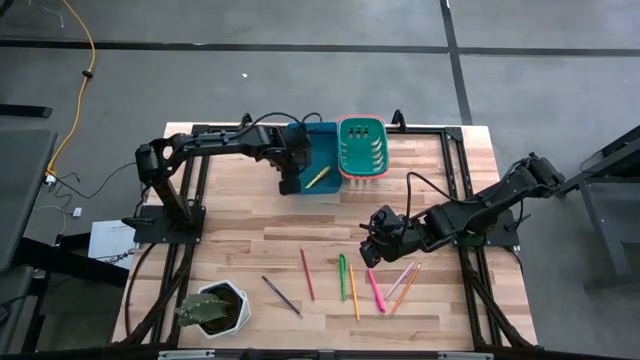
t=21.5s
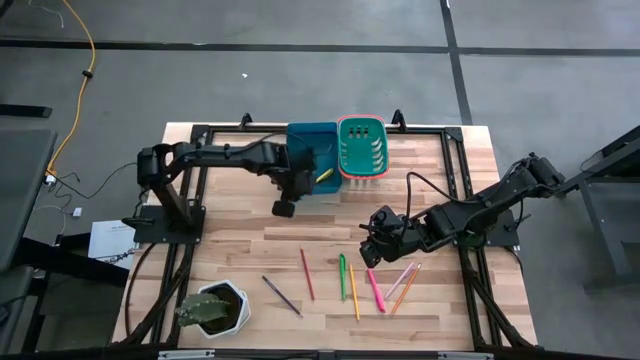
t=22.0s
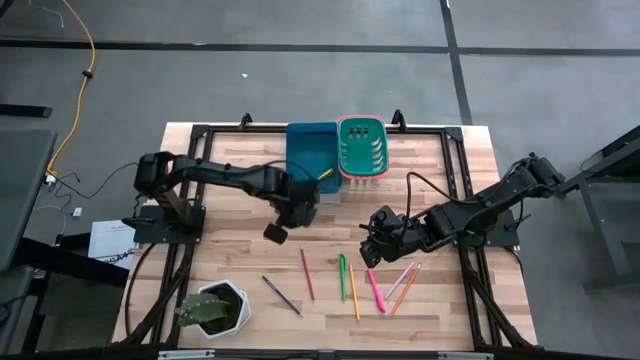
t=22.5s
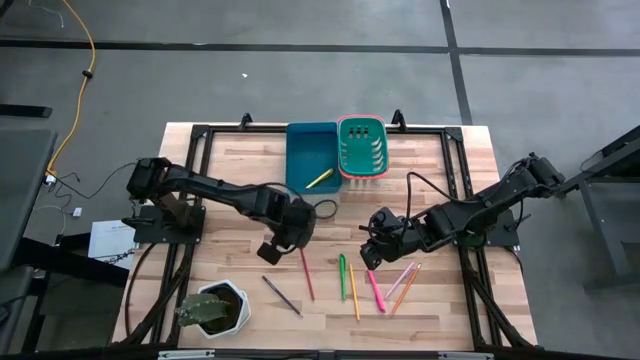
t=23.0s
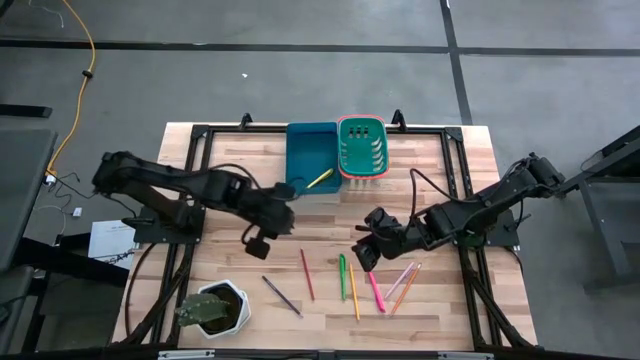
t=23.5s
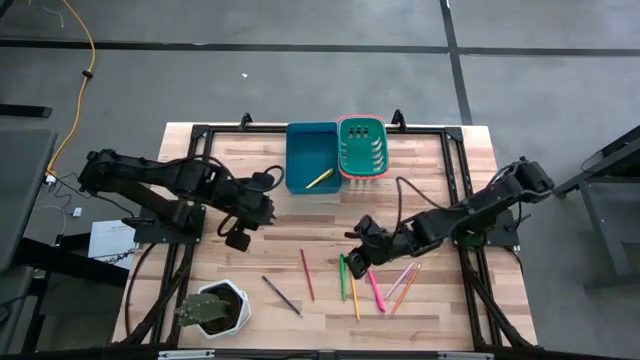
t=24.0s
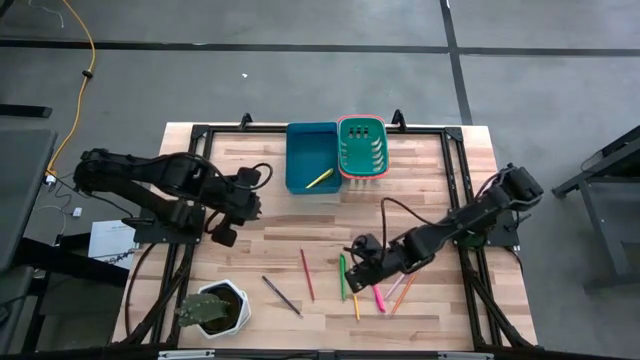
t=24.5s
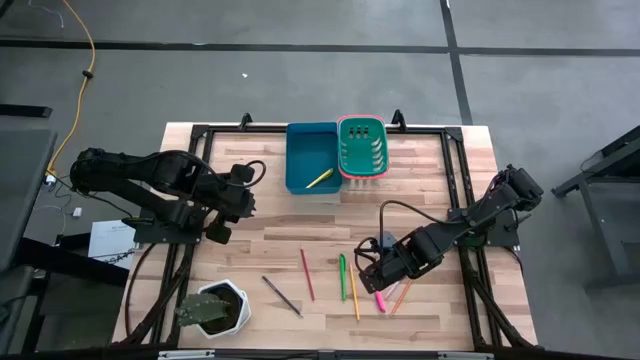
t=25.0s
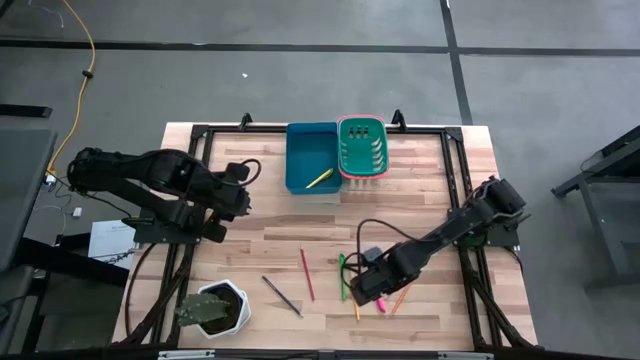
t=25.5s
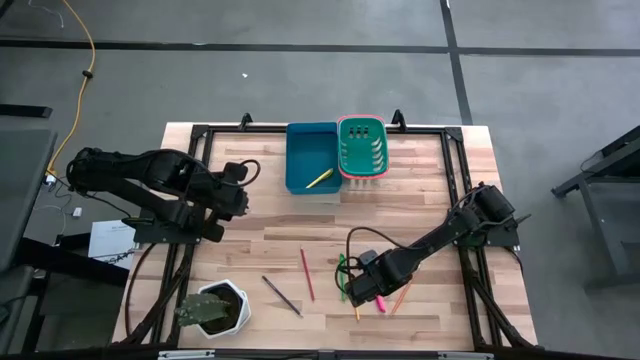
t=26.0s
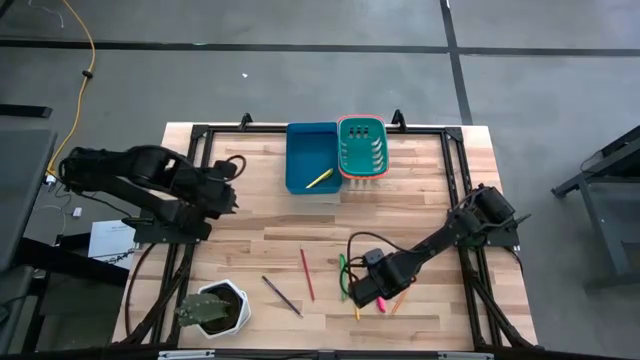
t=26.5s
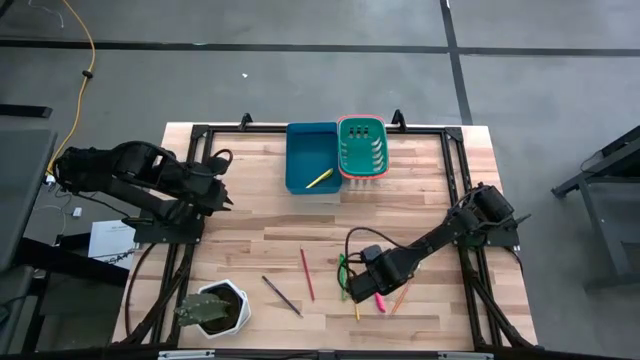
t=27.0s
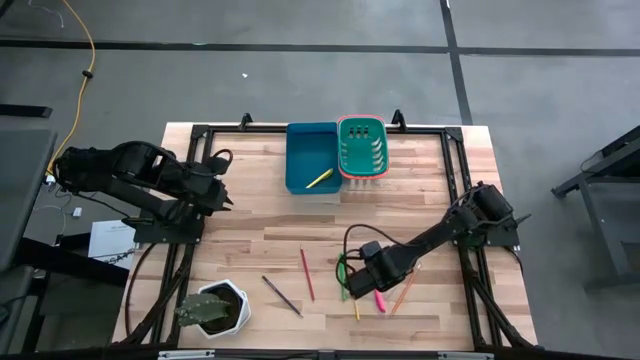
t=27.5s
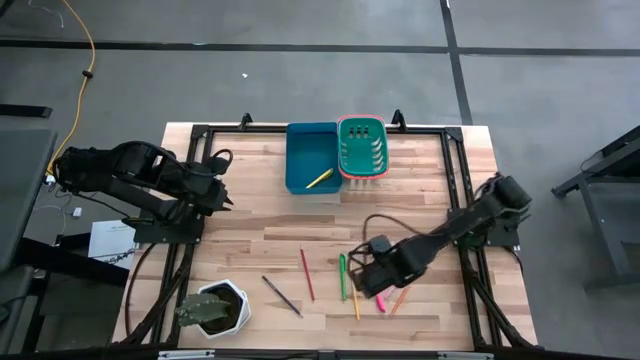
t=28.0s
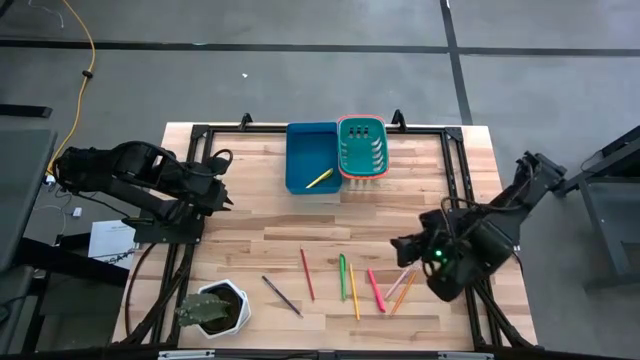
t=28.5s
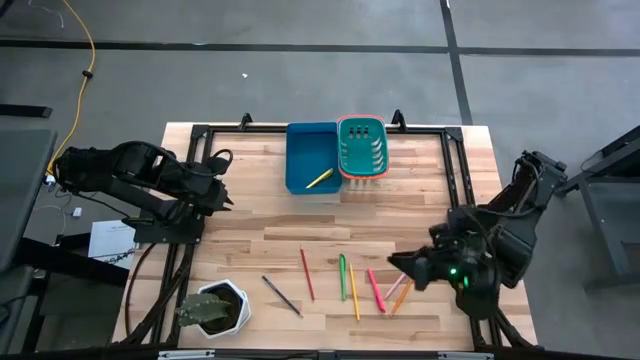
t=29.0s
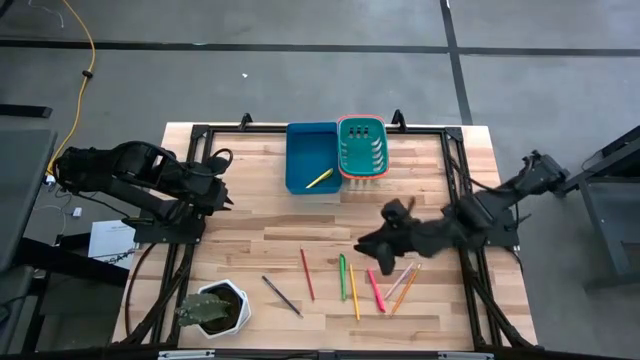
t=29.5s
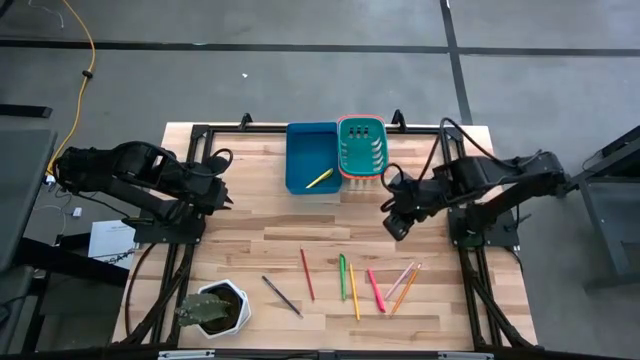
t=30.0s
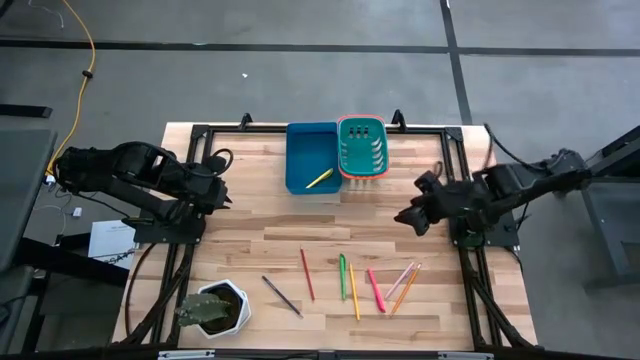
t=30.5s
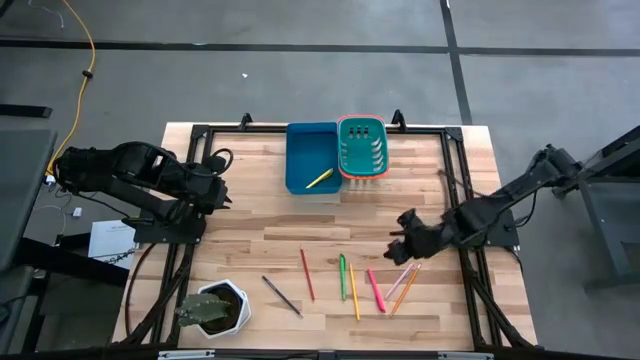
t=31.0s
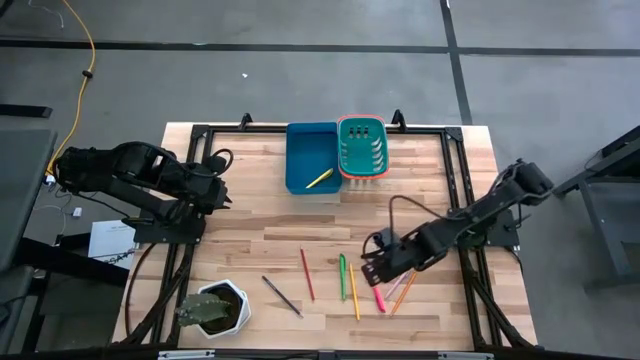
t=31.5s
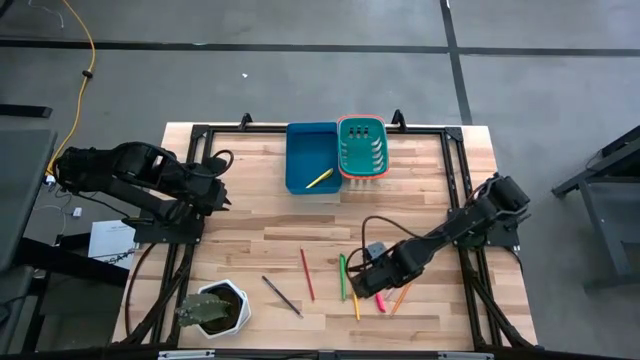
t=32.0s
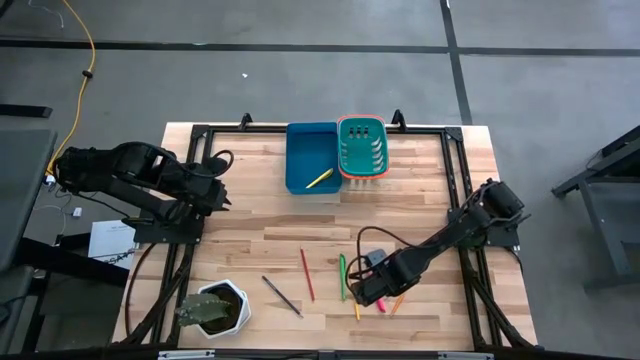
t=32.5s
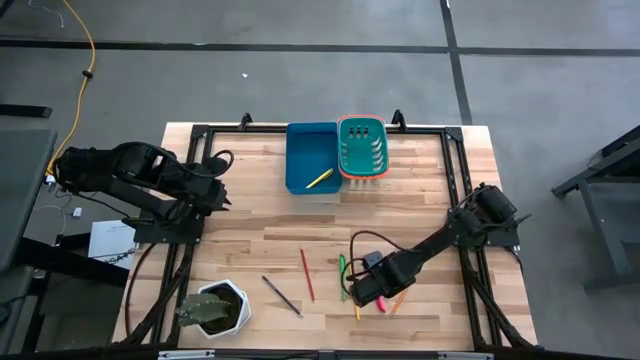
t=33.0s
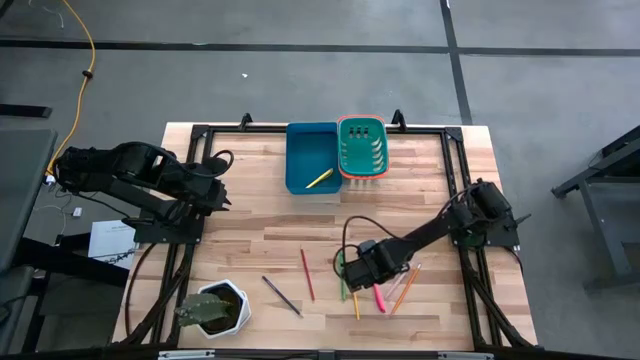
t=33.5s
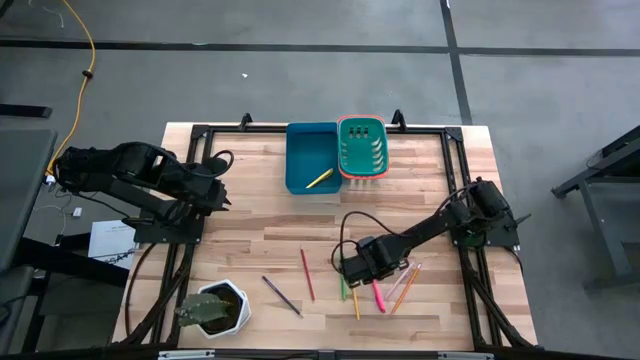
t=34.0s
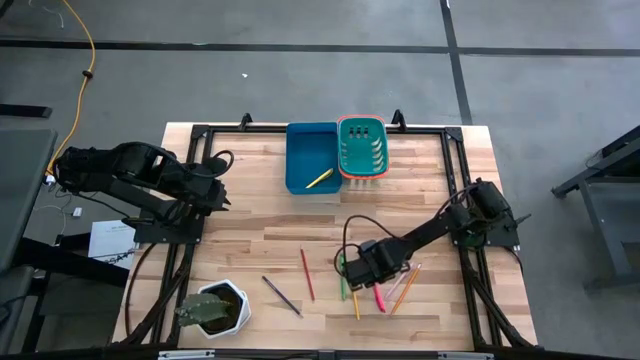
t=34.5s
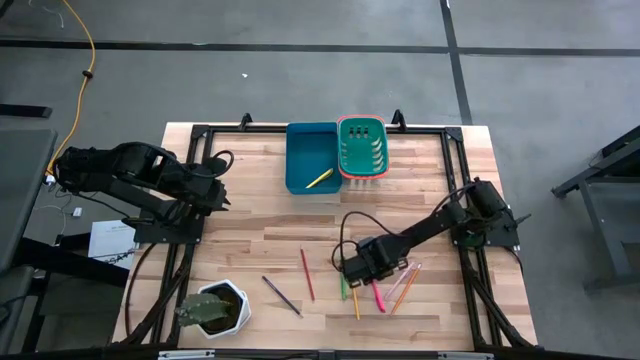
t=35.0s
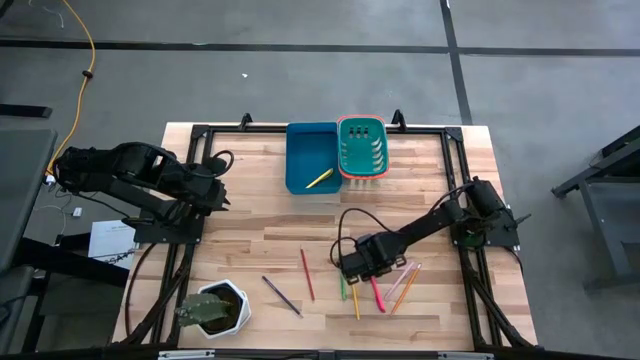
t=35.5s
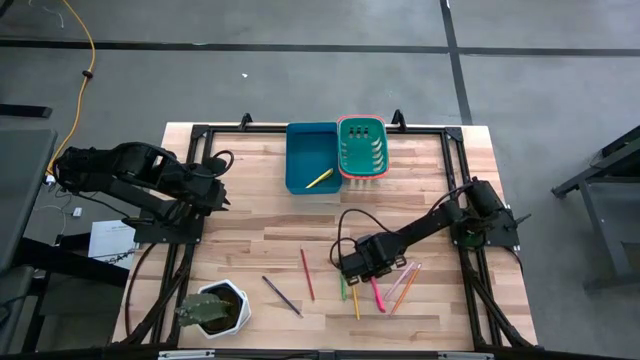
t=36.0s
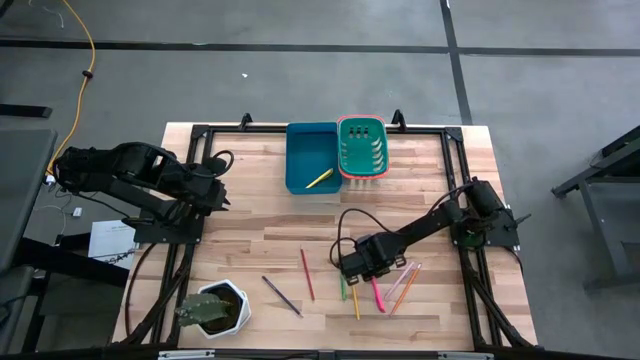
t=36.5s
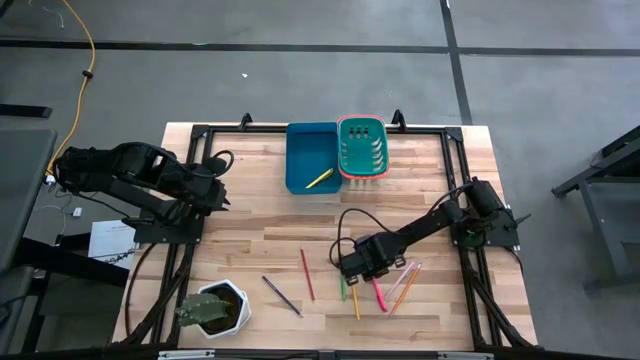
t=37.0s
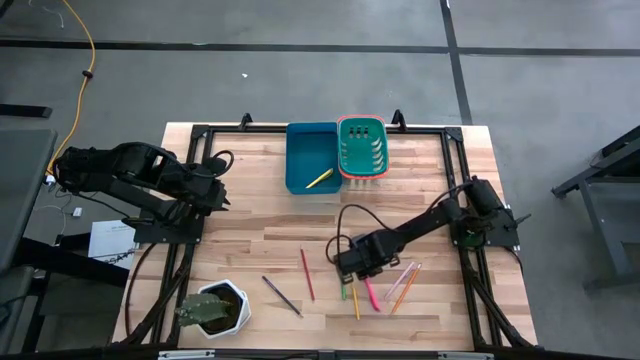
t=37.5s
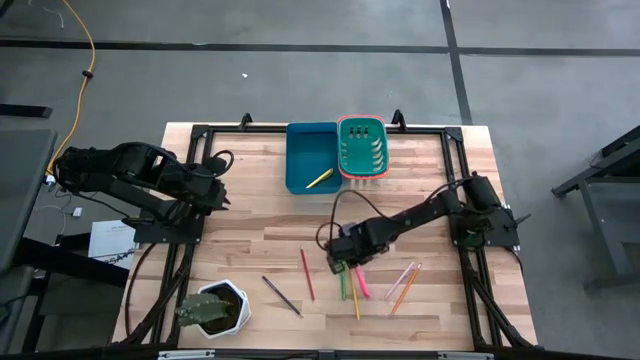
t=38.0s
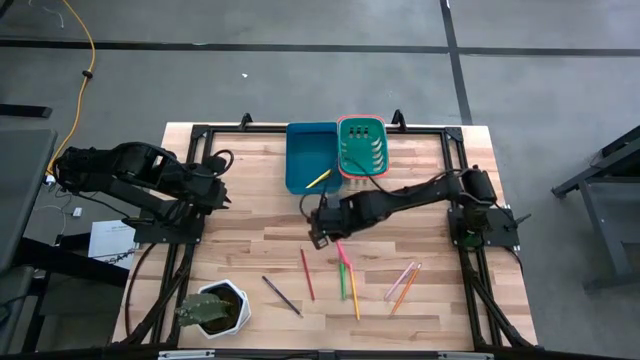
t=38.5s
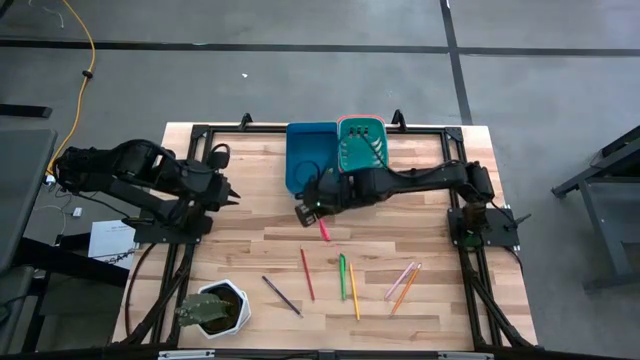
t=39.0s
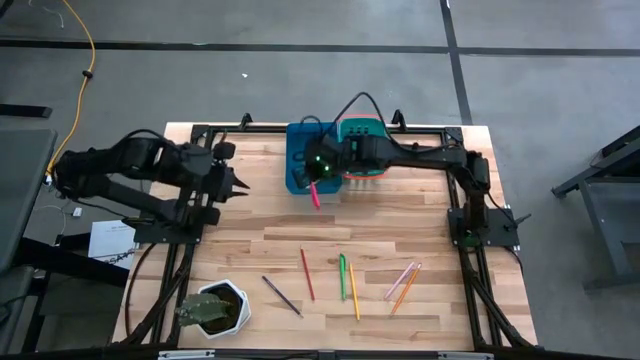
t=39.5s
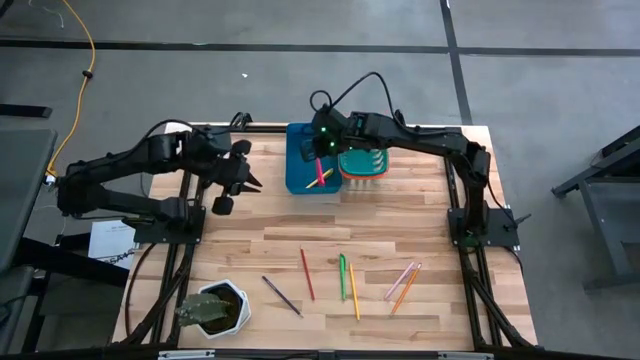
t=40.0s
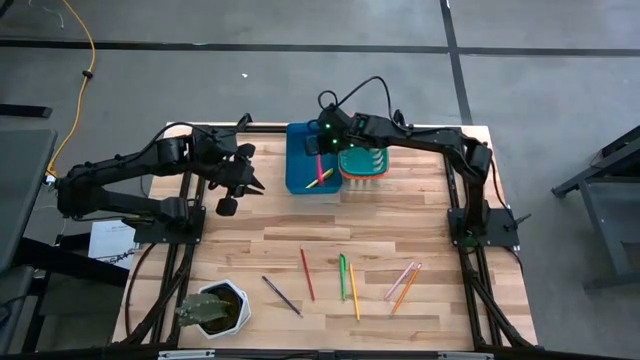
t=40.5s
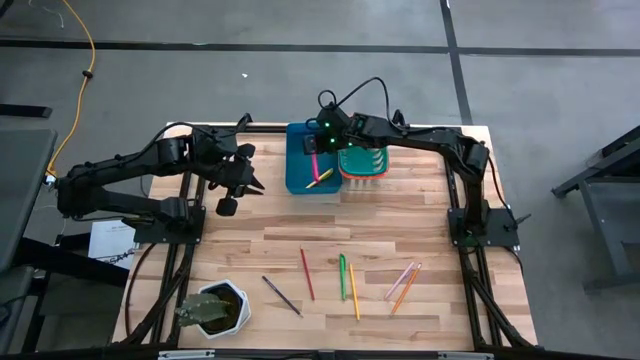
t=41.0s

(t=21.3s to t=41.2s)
Task: Sort pens & pencils
Put the pink pen into the blue bin
